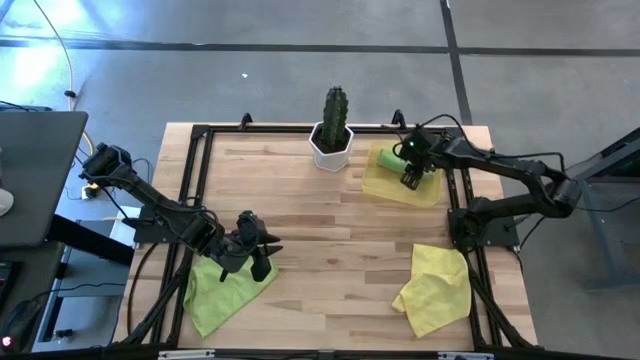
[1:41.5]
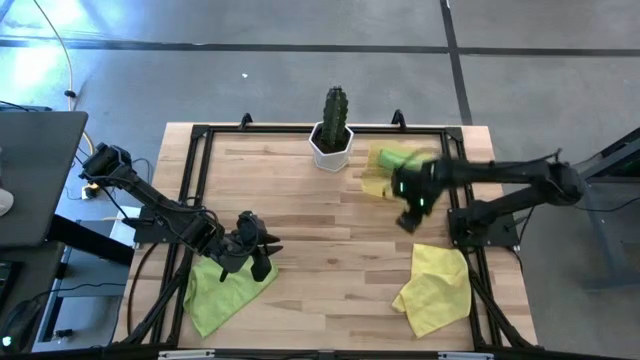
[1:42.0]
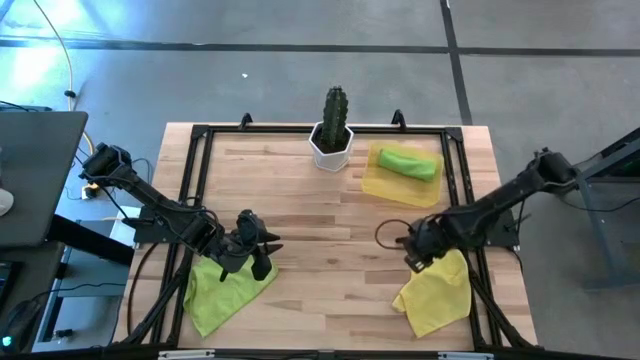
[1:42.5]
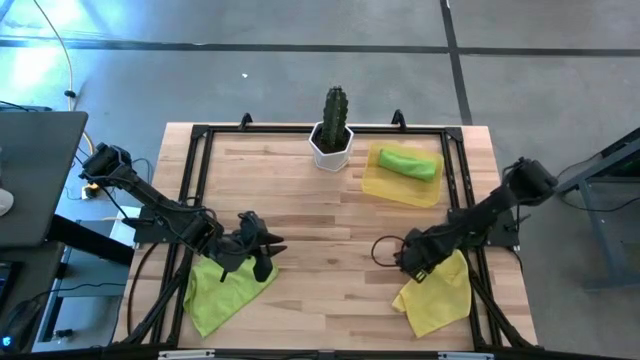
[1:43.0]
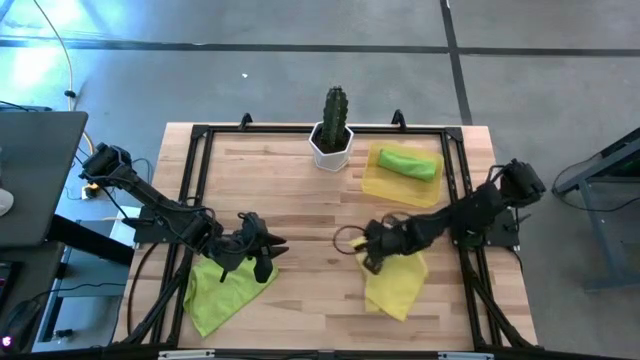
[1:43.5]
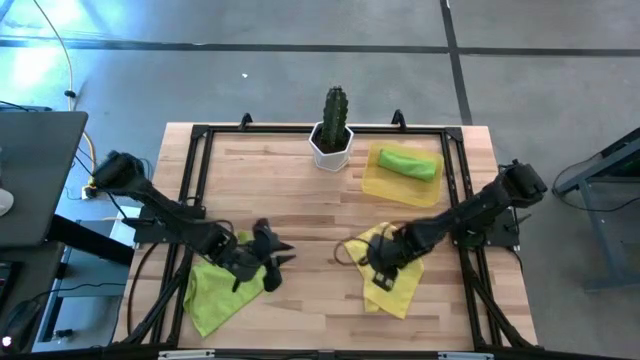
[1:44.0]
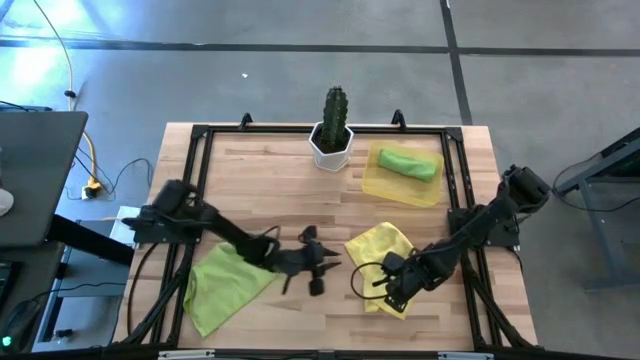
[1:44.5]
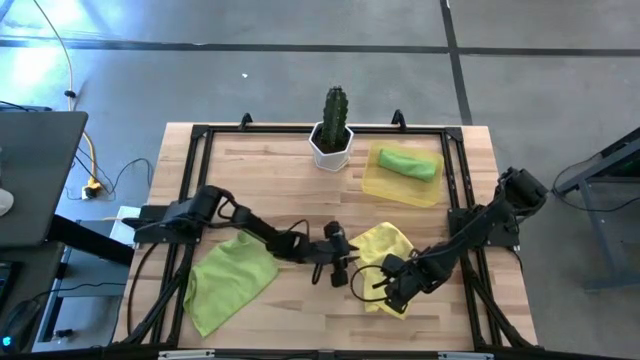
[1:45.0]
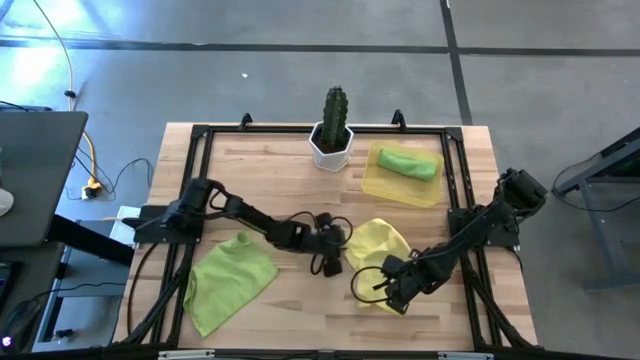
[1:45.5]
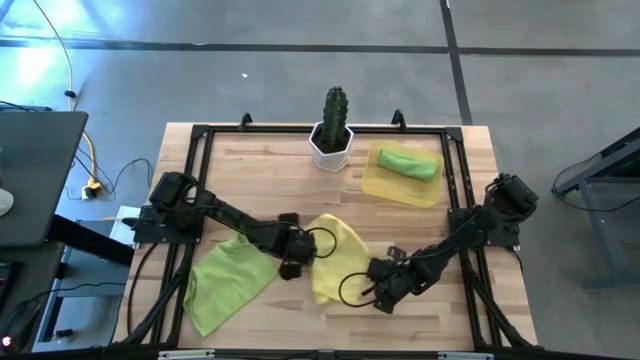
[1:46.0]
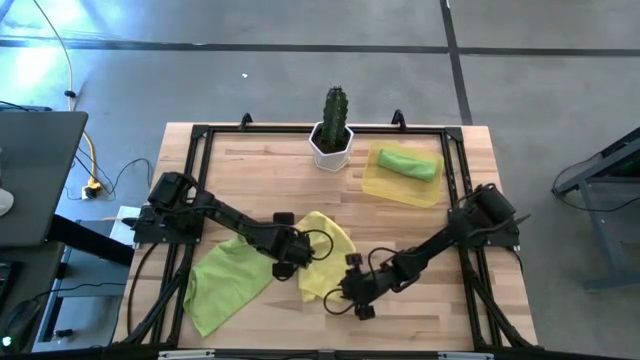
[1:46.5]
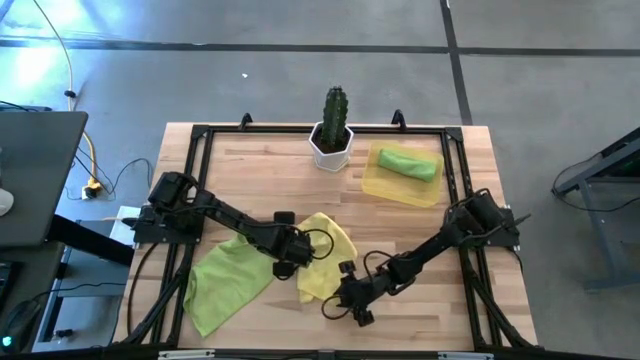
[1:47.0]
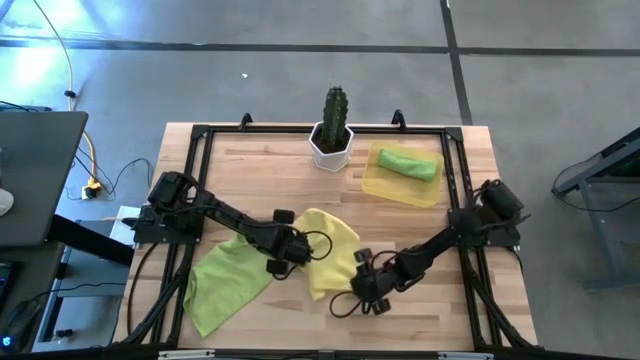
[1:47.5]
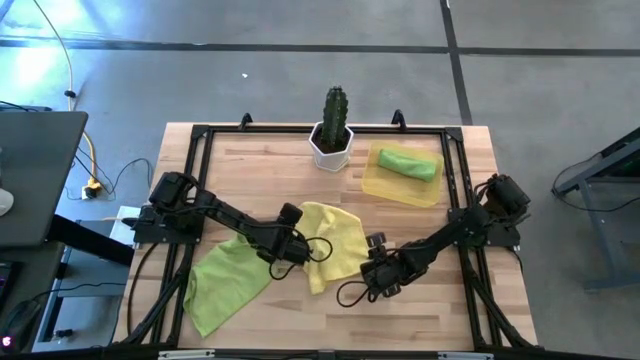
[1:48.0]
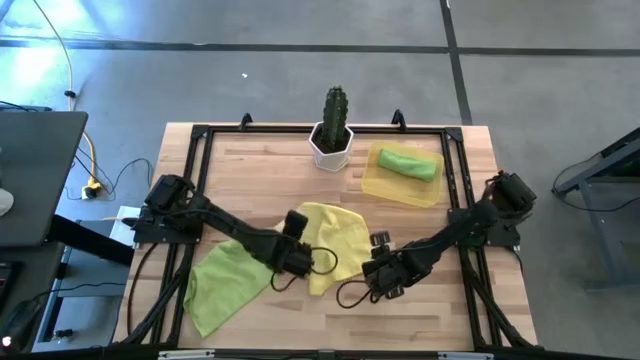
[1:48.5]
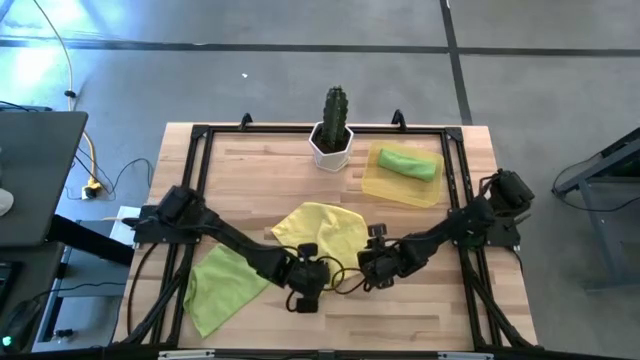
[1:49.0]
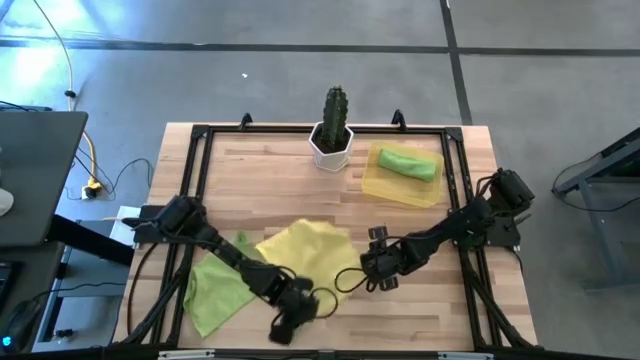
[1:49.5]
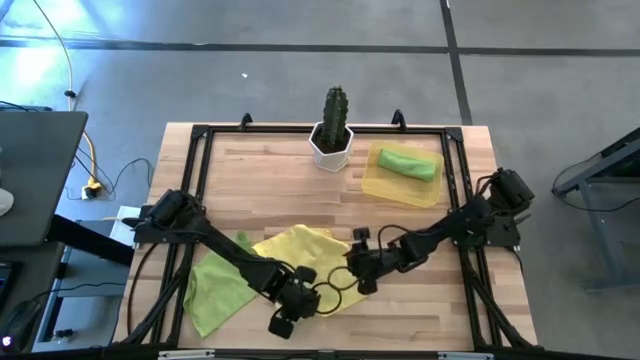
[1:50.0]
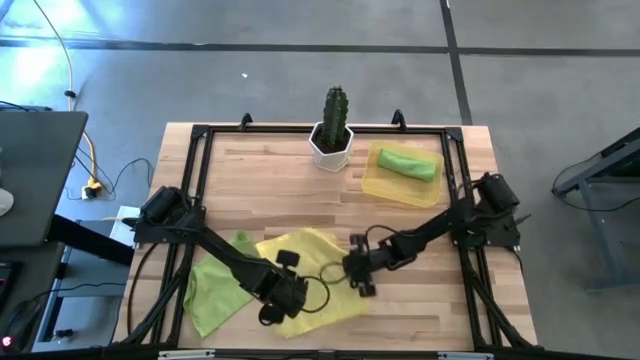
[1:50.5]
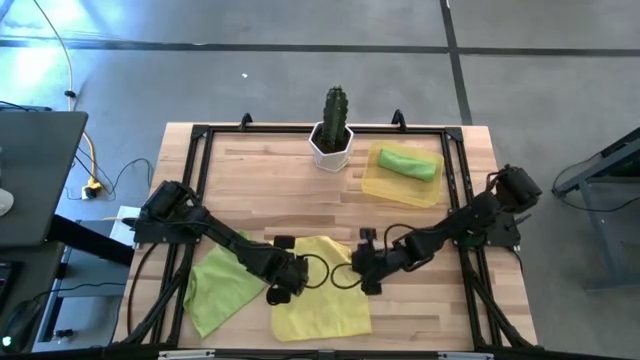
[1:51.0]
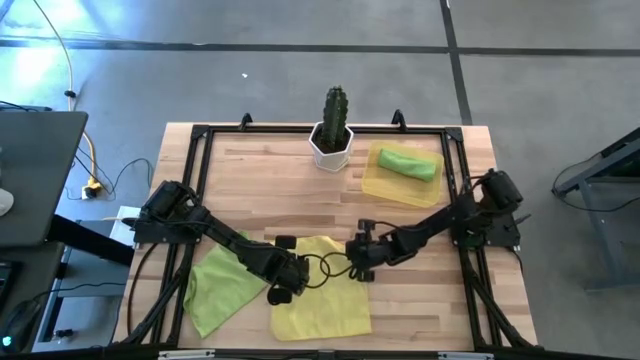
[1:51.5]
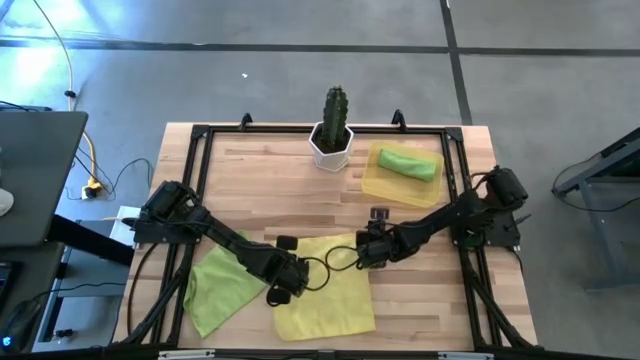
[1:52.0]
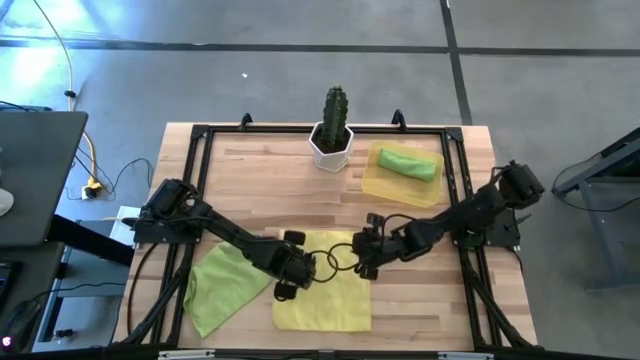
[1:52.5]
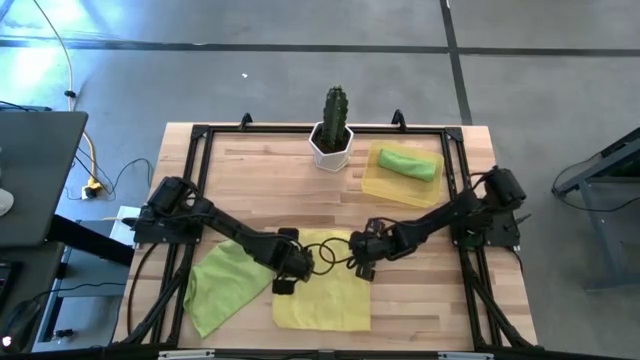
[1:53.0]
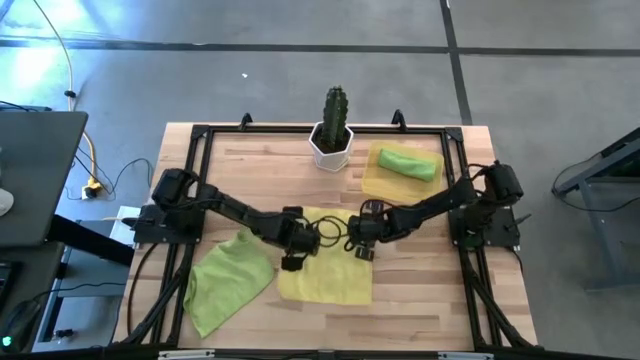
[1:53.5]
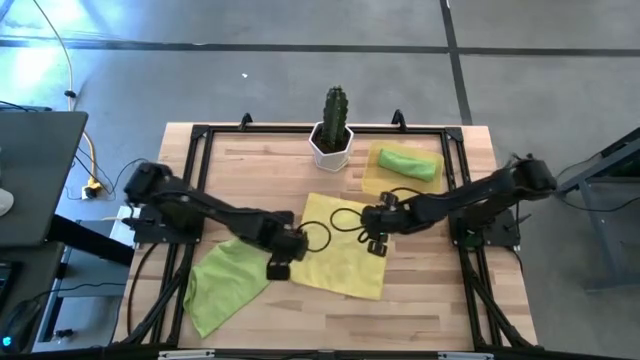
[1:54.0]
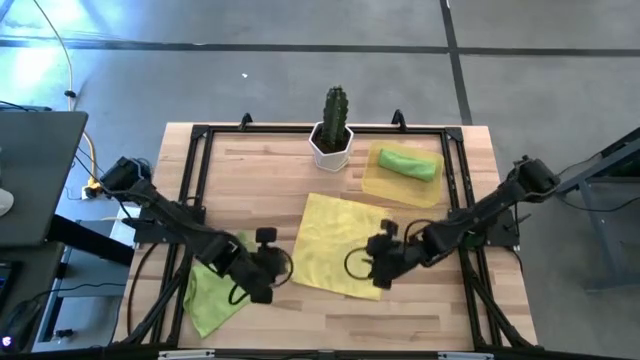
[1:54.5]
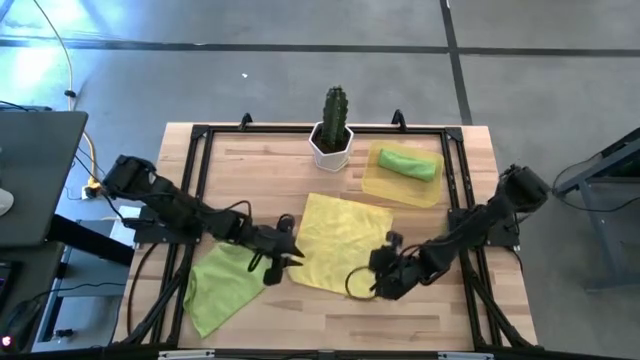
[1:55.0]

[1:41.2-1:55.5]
Task: Roll microfiber towels into tight, uniform cylinder then place into a basket
Roll the yellow towel

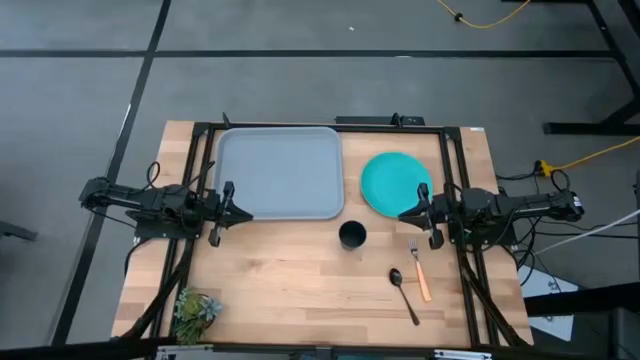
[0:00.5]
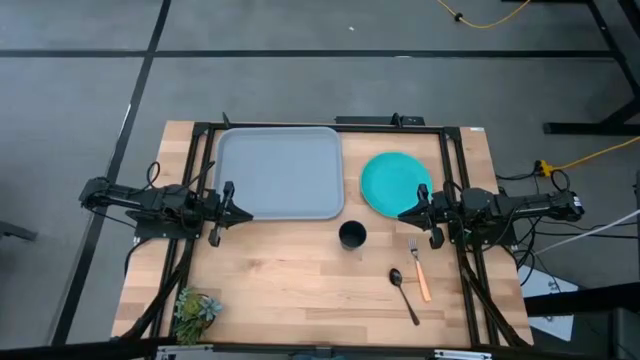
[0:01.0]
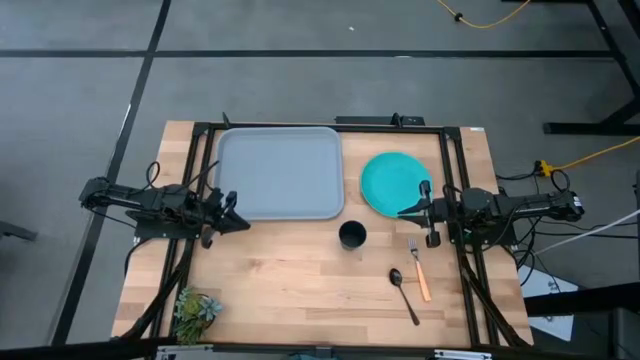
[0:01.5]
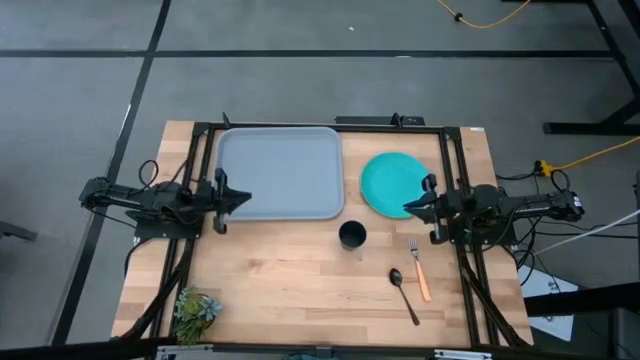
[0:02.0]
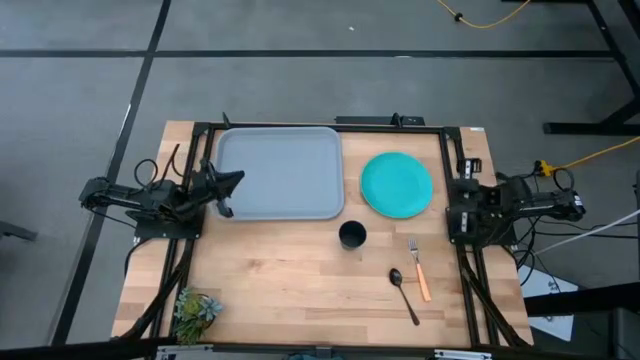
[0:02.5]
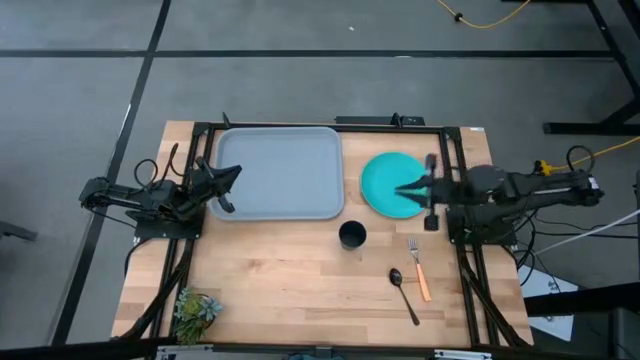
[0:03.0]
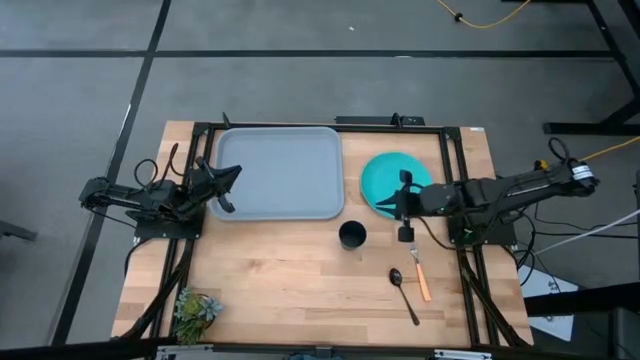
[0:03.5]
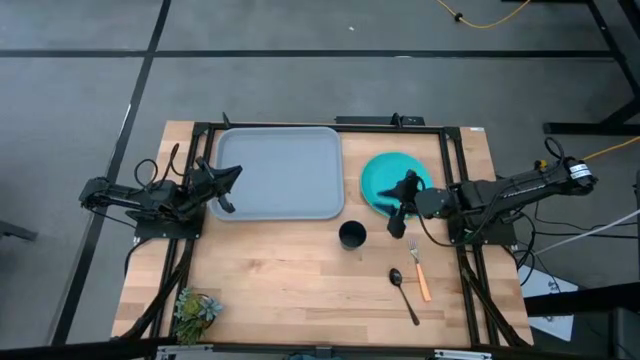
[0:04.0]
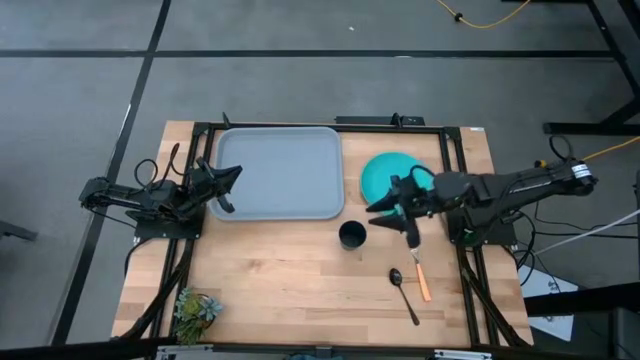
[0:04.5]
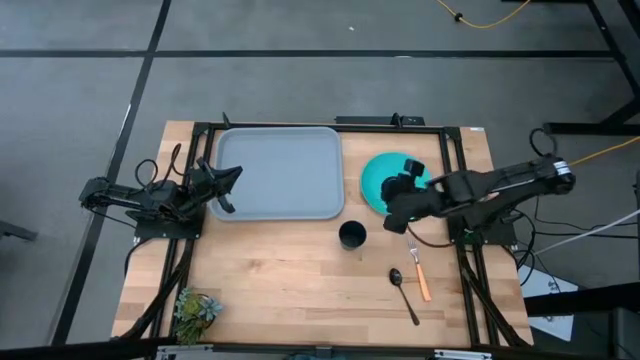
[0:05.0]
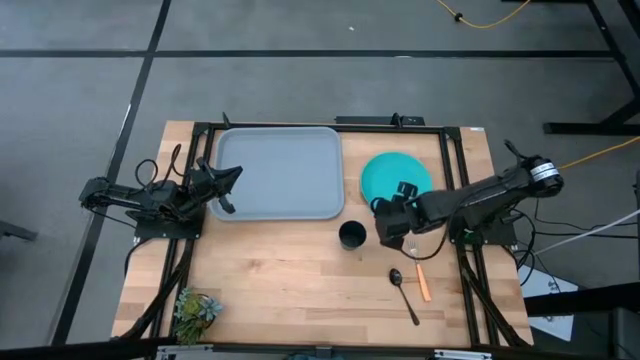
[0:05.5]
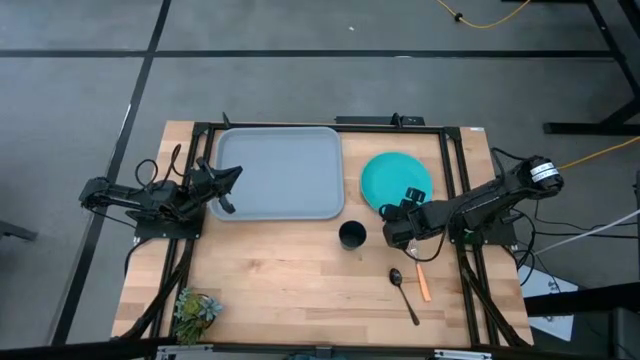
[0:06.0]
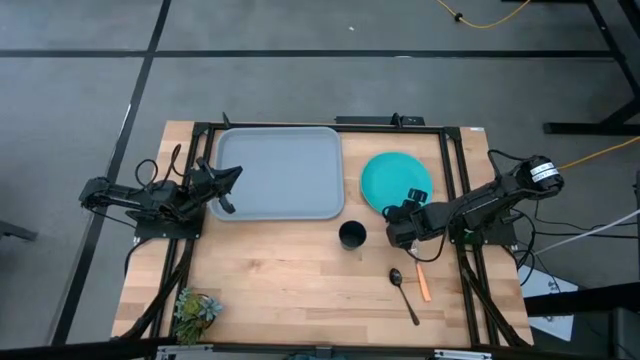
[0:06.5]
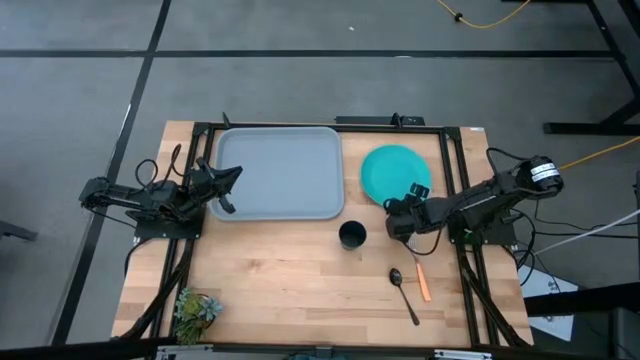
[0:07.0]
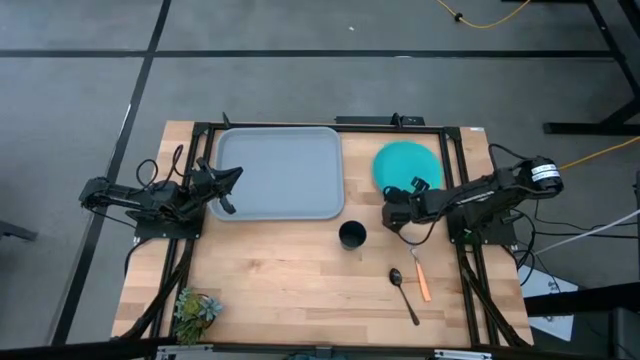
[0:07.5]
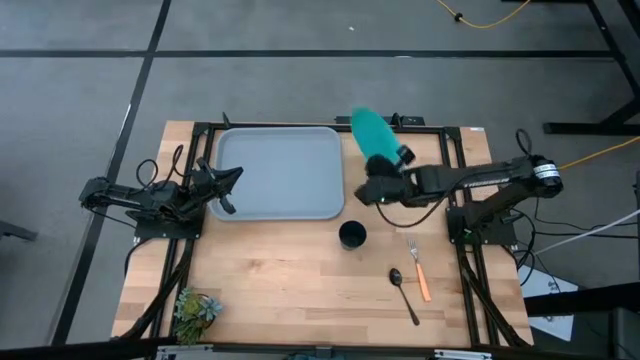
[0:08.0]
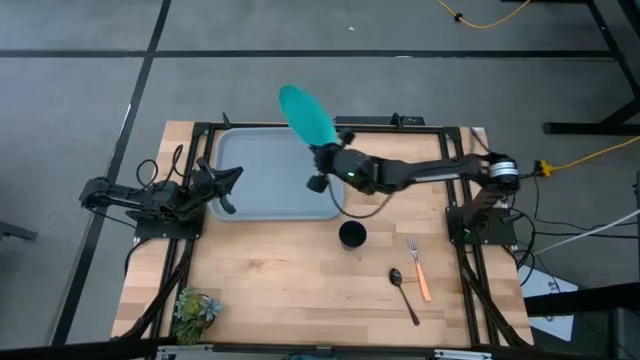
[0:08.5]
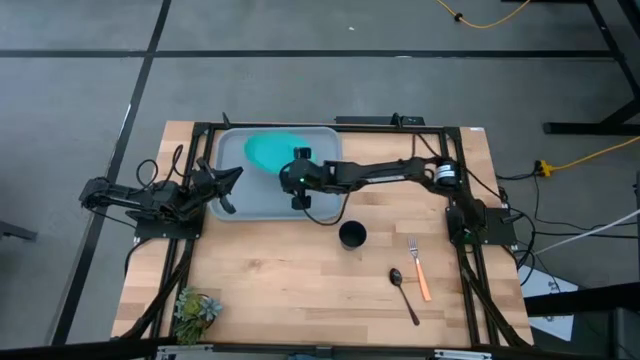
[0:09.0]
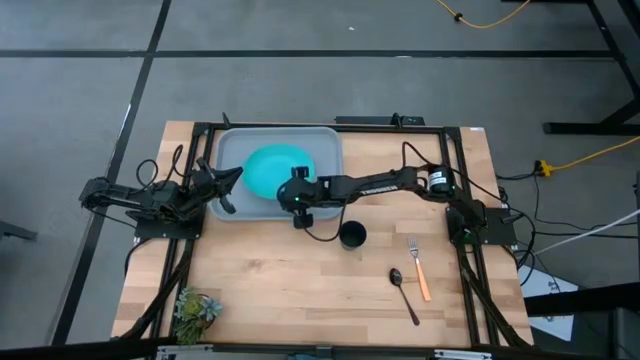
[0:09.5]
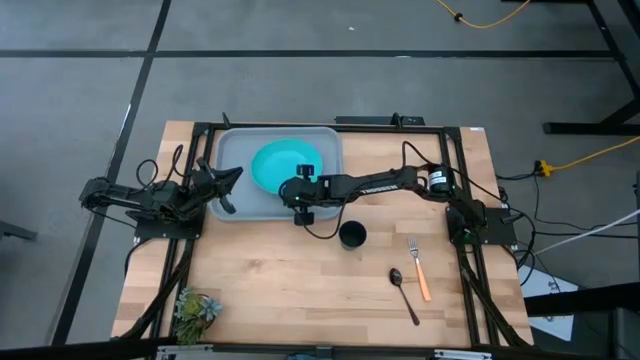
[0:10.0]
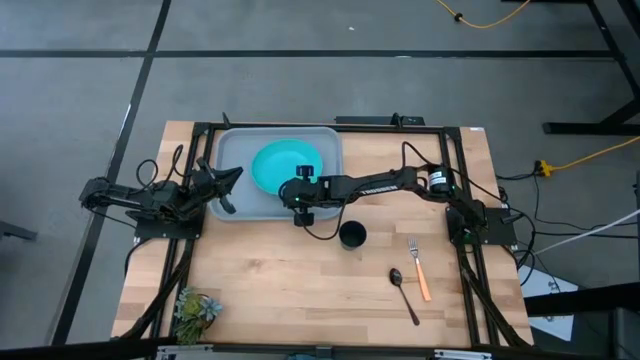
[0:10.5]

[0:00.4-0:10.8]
Task: Pick and place plate/cup/fork/spoon on tray
Put the light blue plate on the serving tray
